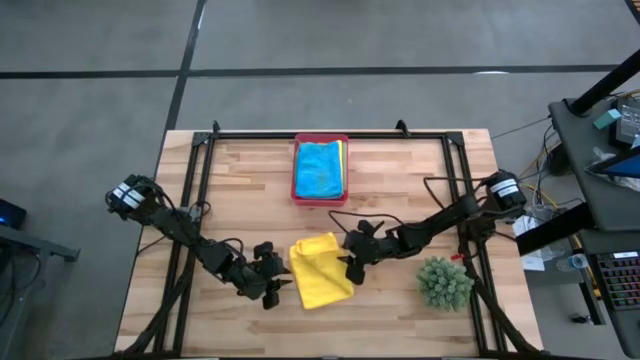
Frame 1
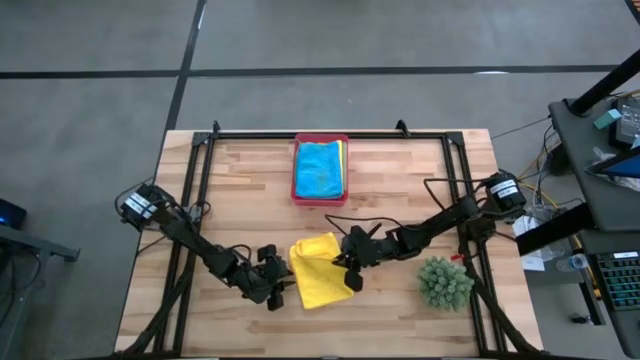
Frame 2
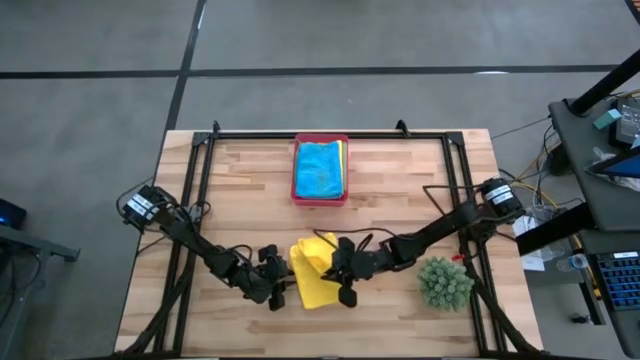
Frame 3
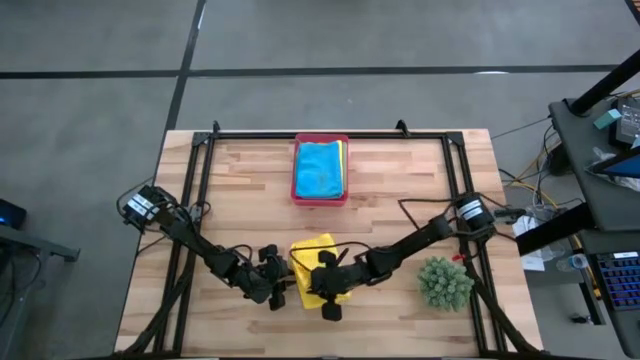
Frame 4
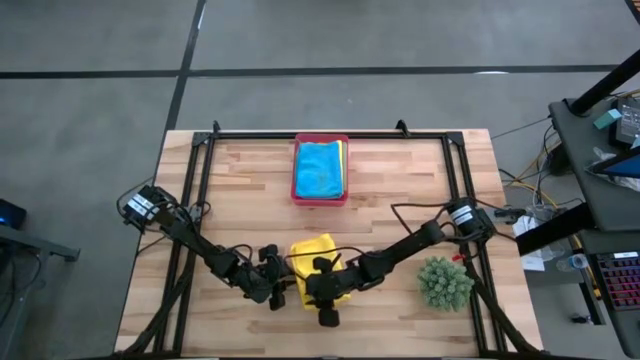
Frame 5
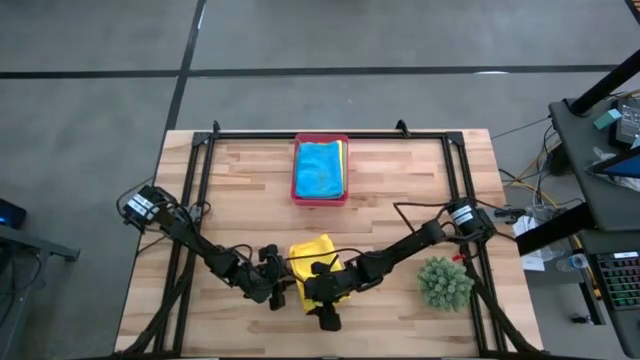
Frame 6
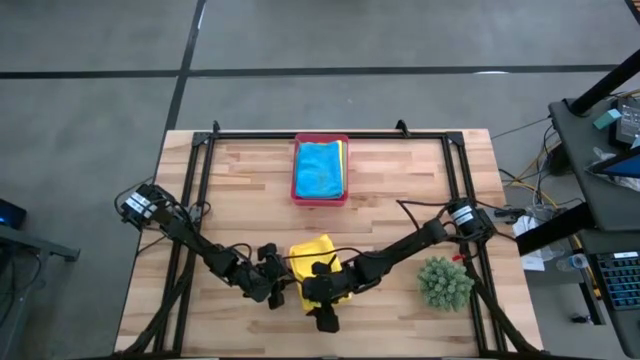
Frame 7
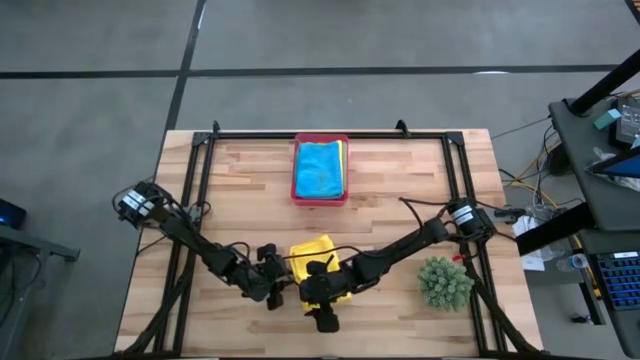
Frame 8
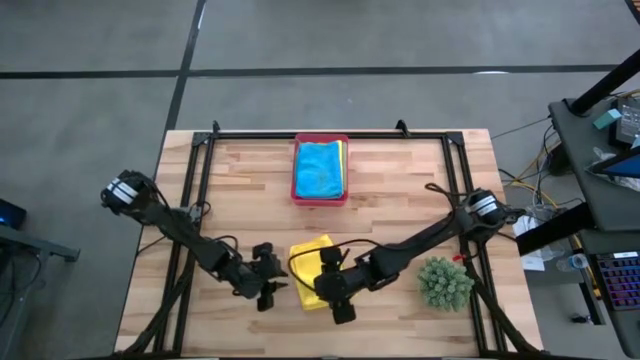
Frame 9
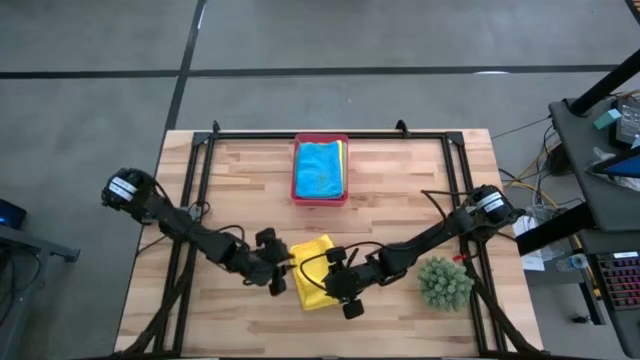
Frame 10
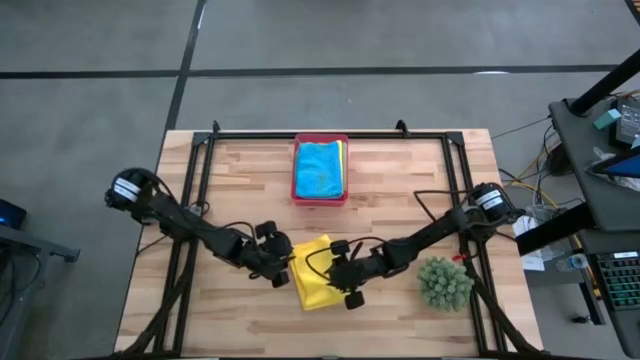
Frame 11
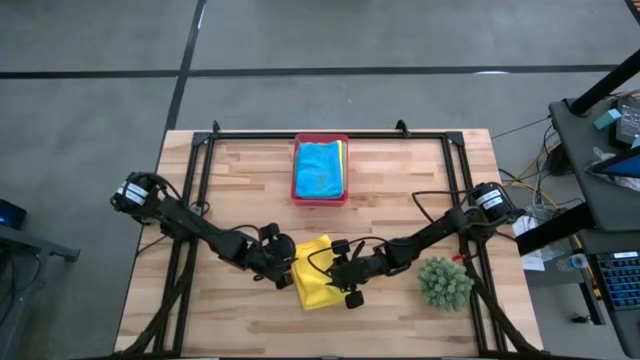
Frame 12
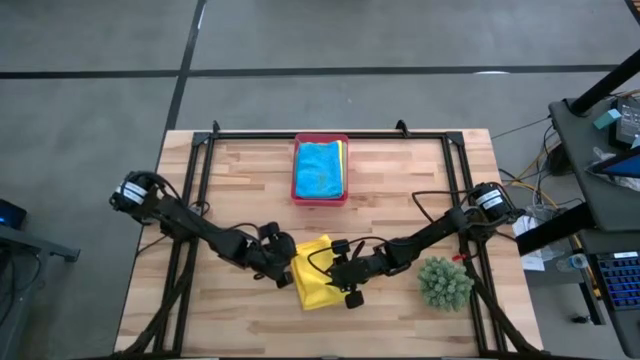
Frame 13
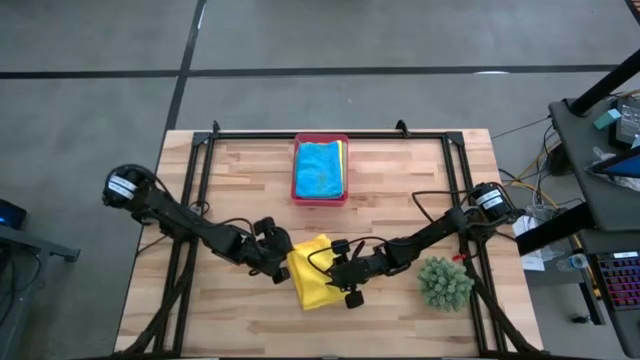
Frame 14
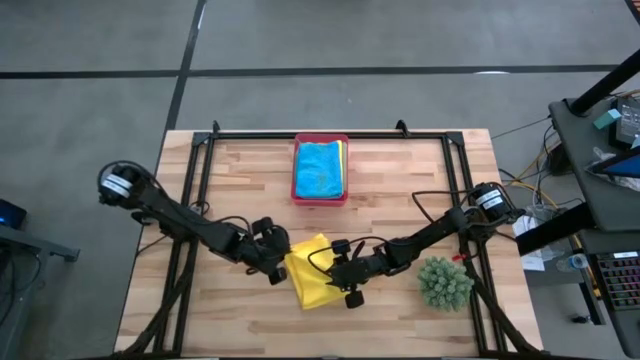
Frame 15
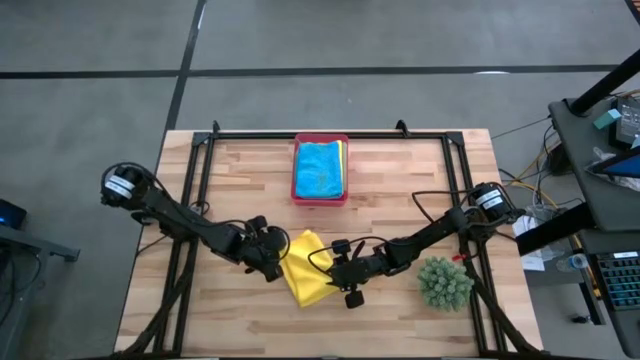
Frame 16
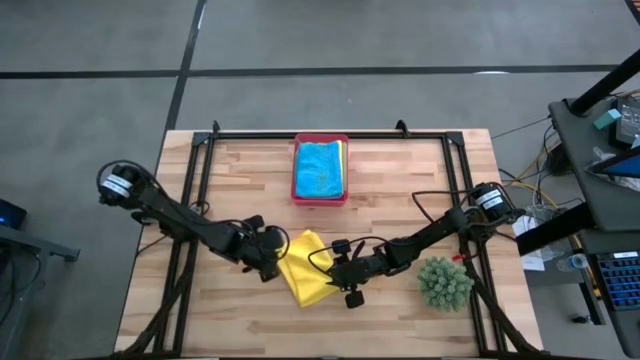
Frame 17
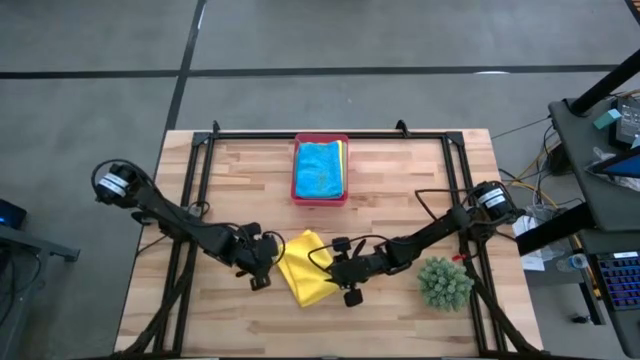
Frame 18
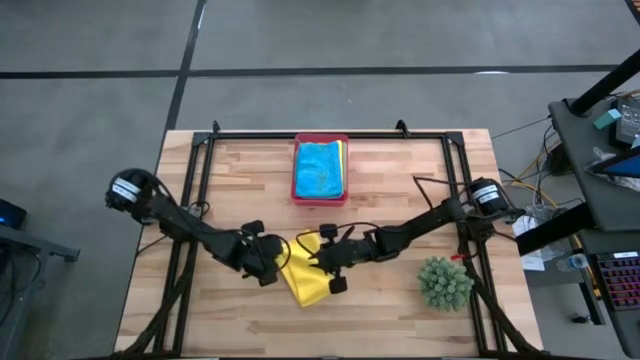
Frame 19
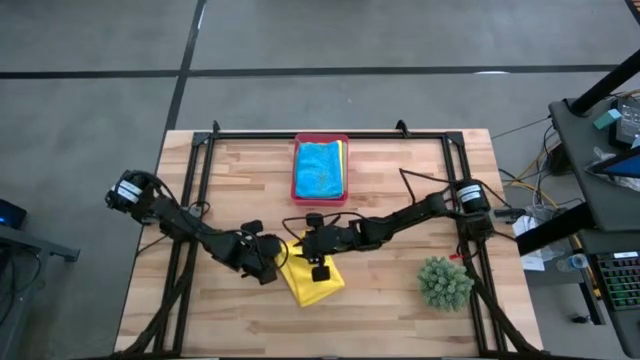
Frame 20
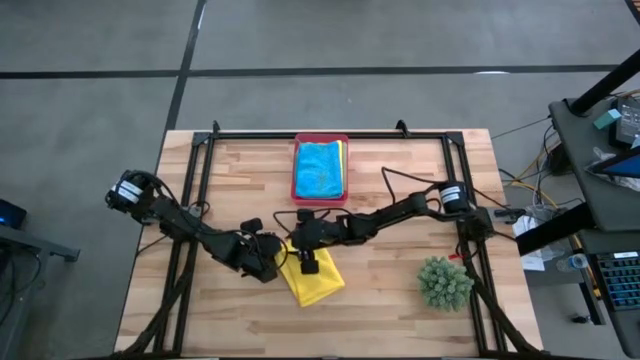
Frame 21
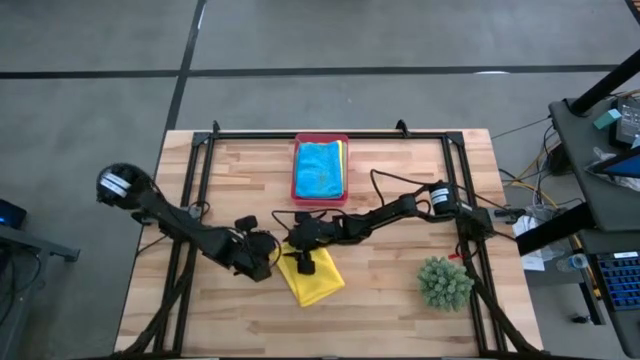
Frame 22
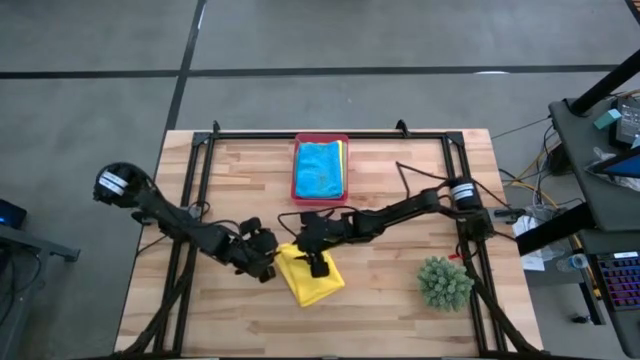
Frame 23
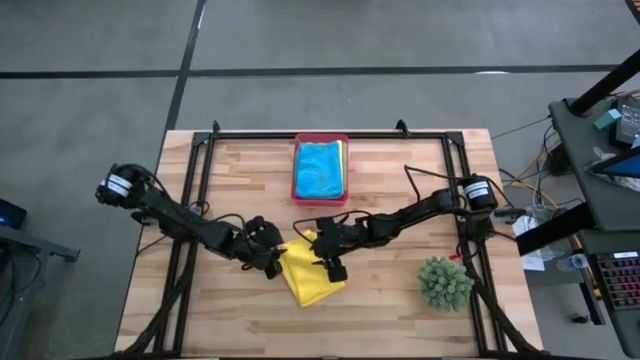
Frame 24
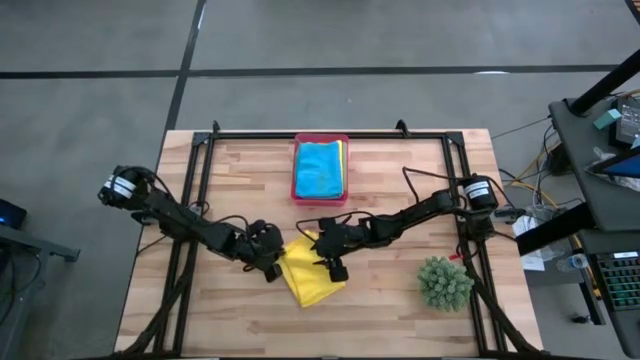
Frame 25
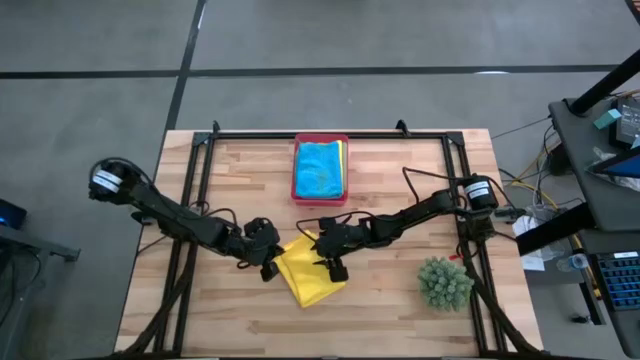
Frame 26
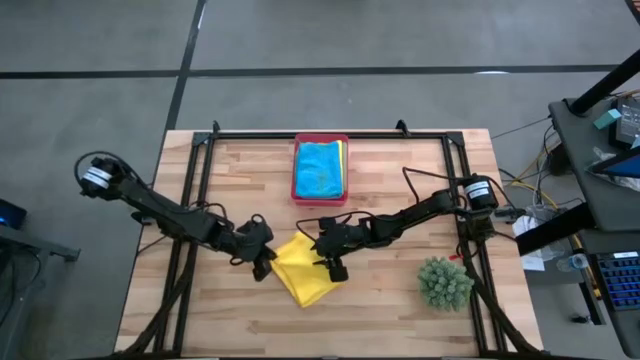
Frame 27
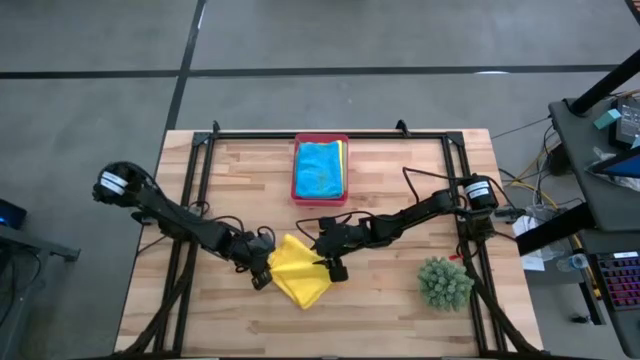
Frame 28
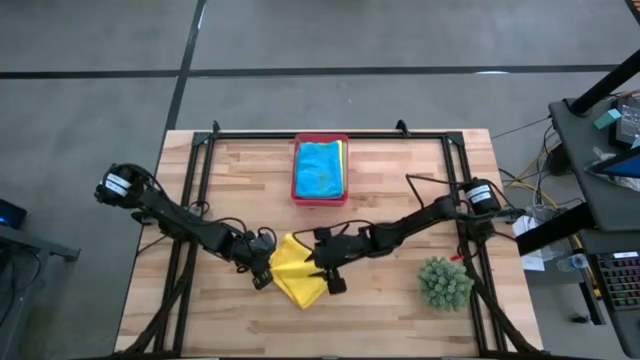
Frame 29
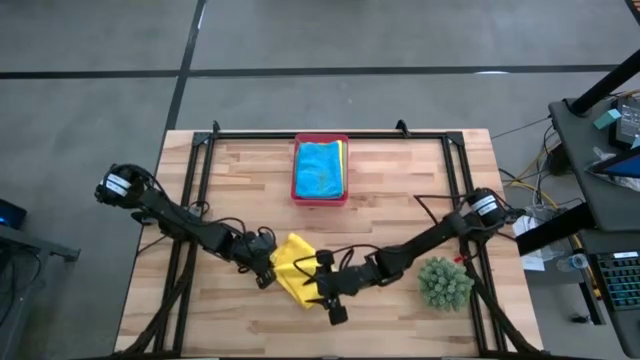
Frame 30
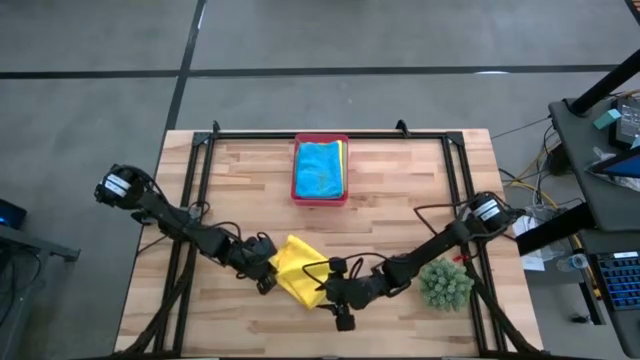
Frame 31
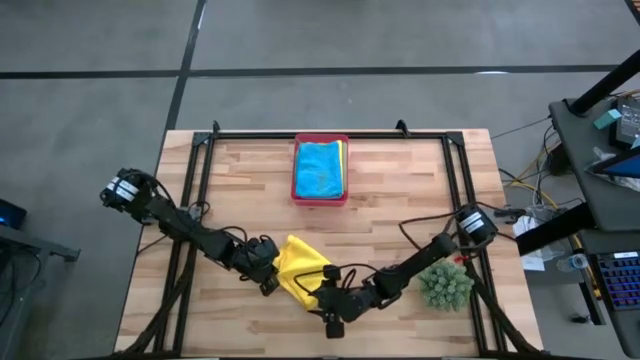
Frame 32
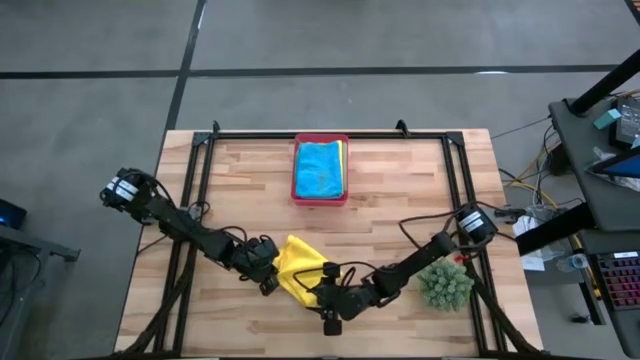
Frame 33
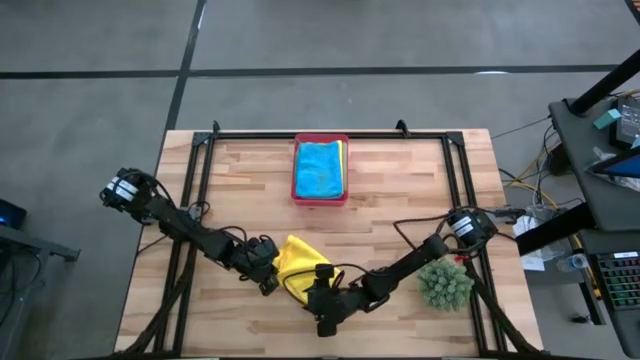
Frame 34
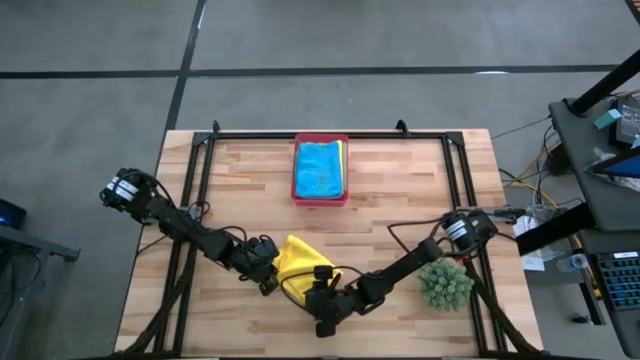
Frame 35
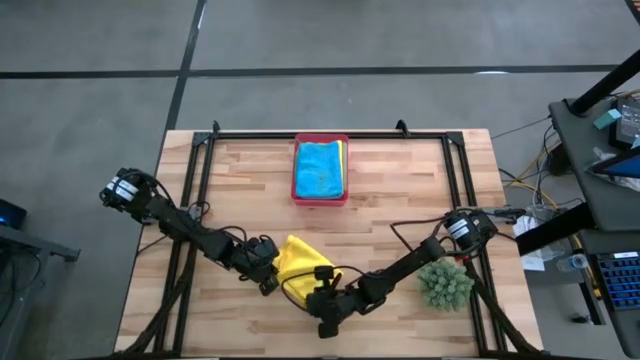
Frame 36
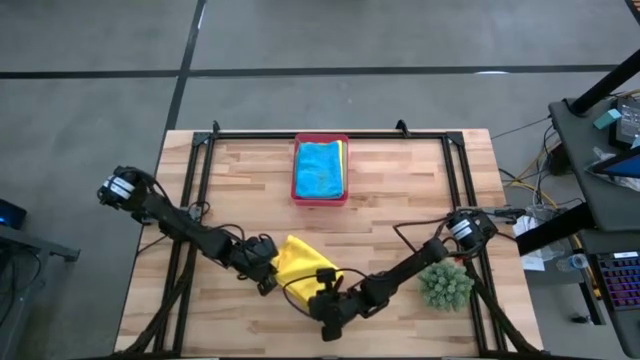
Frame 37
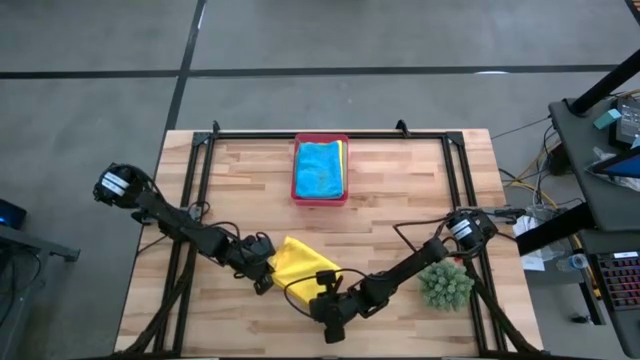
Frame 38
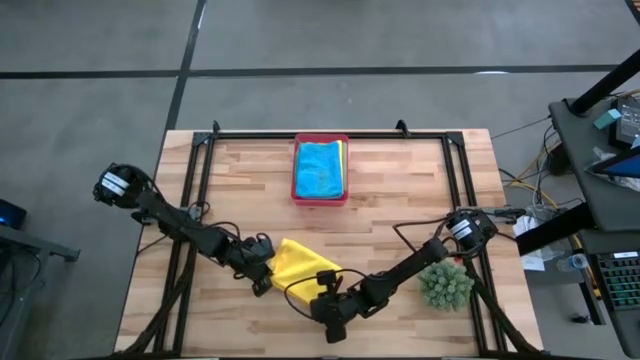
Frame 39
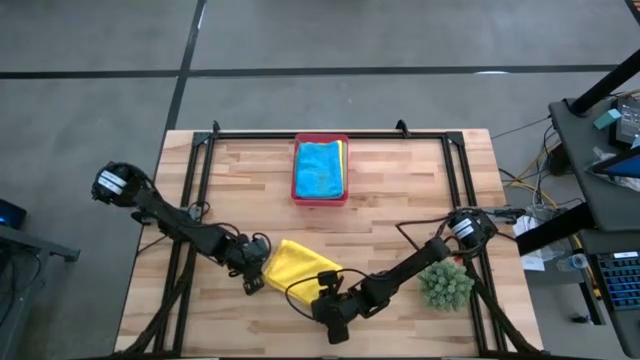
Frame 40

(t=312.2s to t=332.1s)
Task: Fold microfiber towels
Fold the yellow towel
